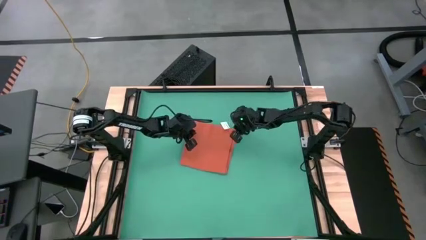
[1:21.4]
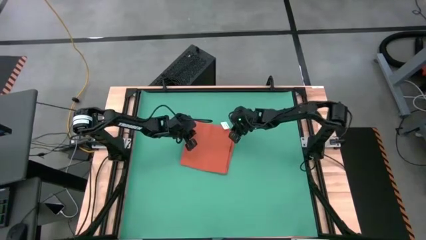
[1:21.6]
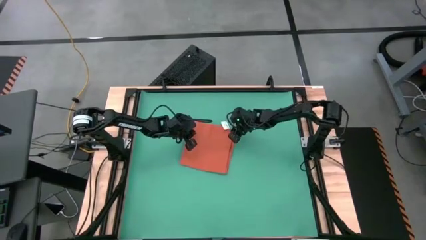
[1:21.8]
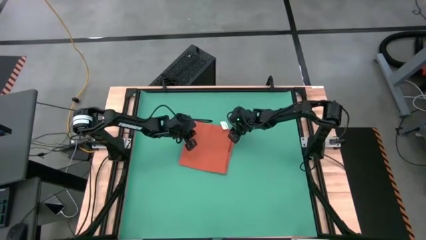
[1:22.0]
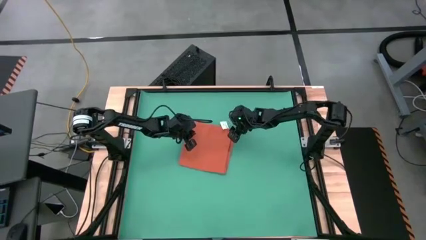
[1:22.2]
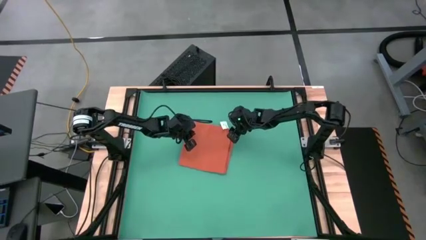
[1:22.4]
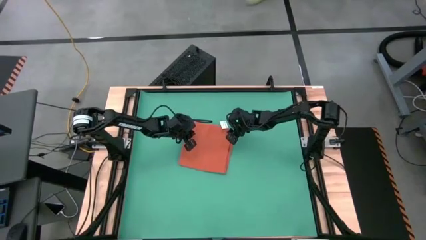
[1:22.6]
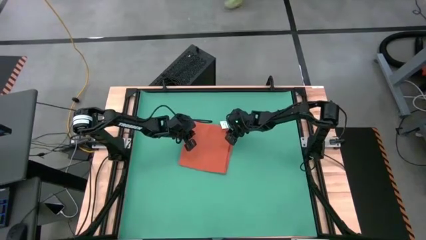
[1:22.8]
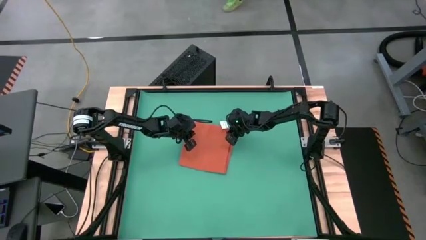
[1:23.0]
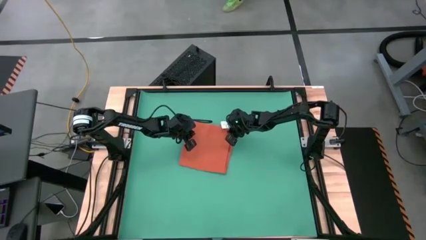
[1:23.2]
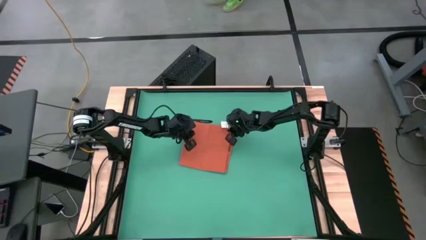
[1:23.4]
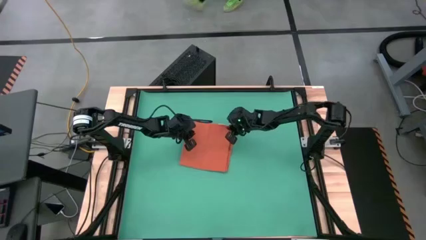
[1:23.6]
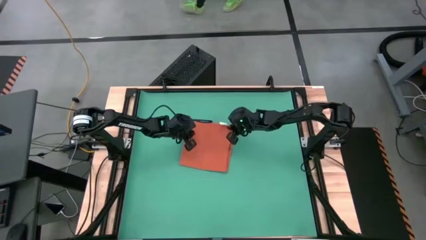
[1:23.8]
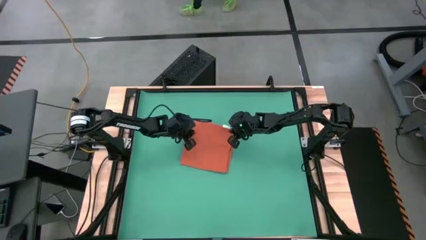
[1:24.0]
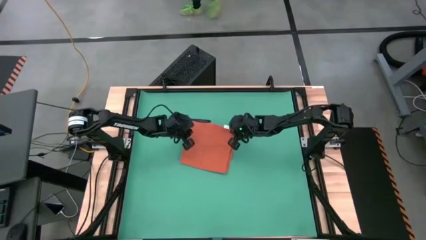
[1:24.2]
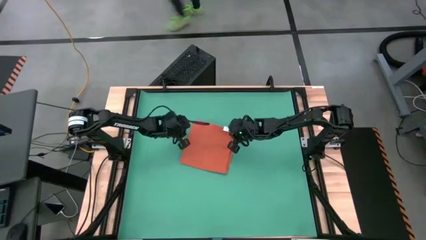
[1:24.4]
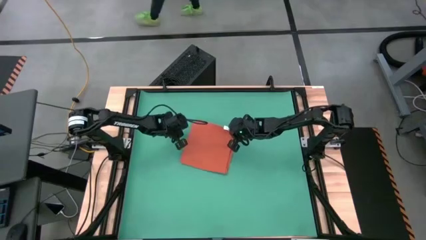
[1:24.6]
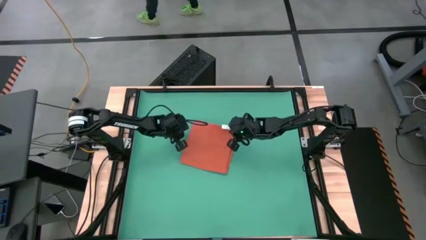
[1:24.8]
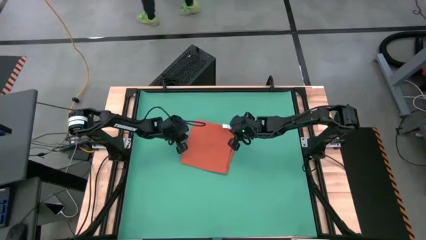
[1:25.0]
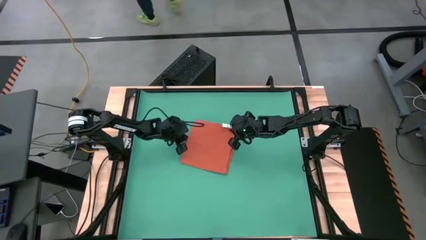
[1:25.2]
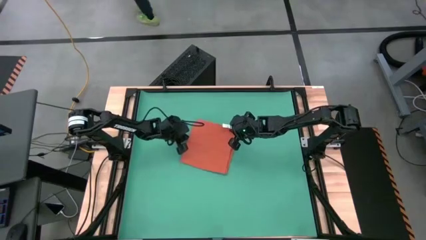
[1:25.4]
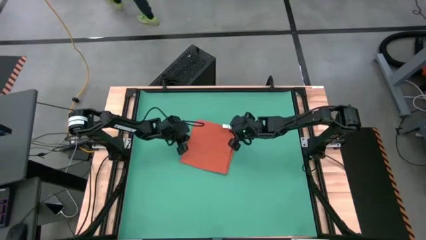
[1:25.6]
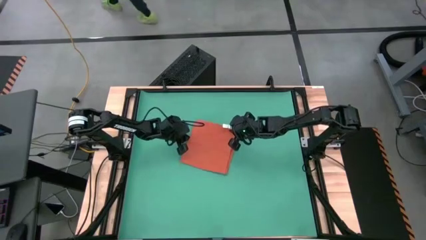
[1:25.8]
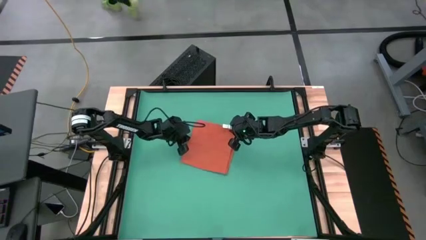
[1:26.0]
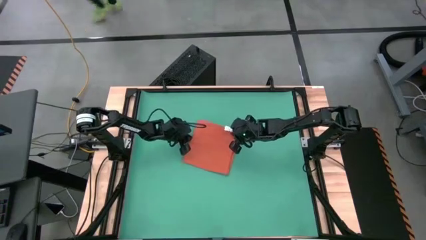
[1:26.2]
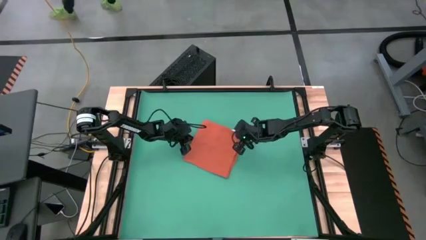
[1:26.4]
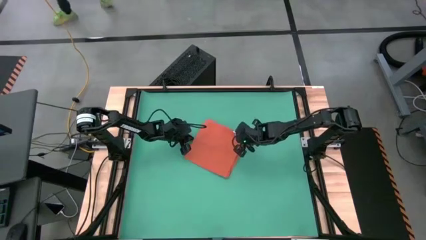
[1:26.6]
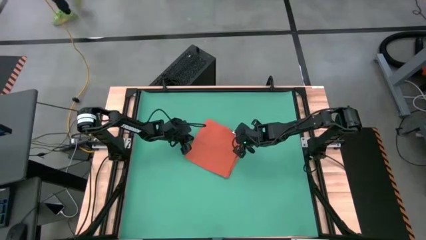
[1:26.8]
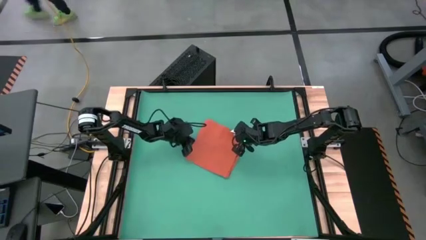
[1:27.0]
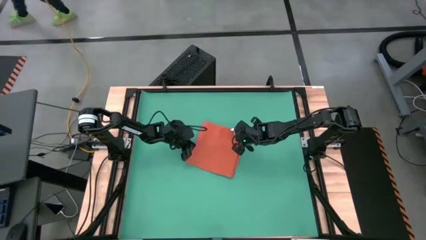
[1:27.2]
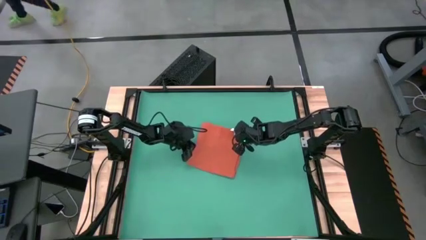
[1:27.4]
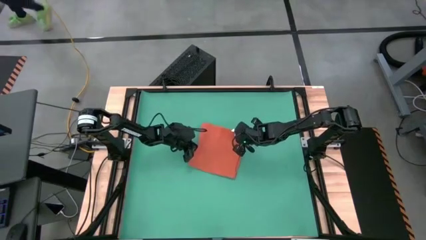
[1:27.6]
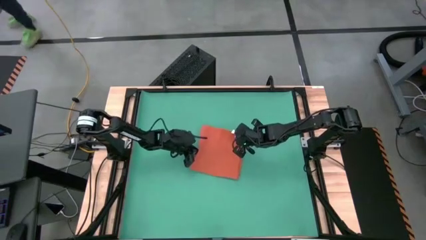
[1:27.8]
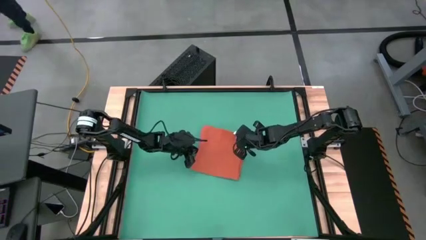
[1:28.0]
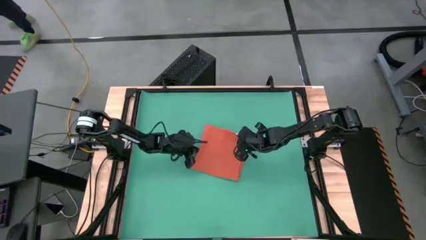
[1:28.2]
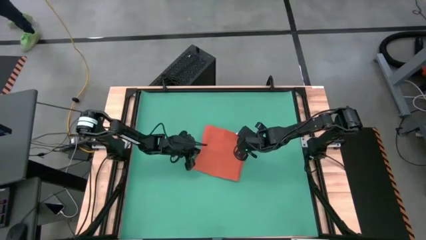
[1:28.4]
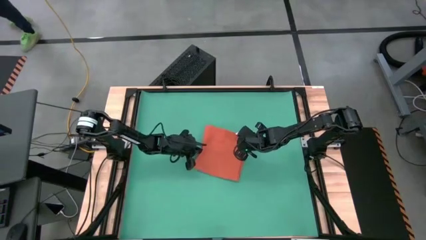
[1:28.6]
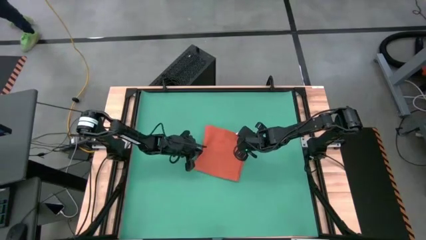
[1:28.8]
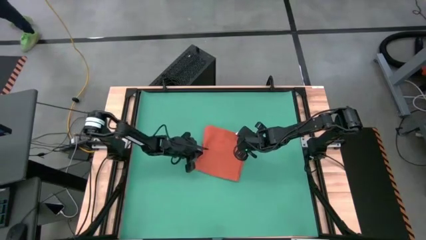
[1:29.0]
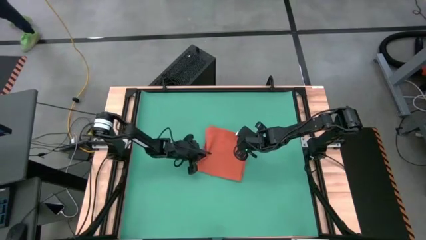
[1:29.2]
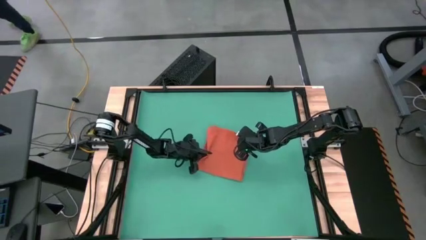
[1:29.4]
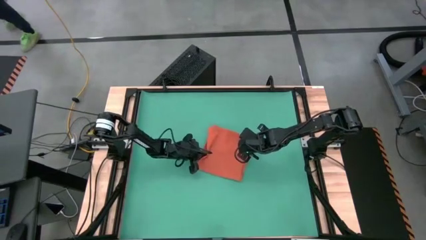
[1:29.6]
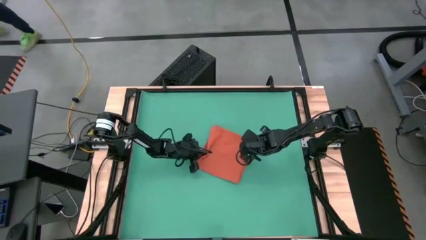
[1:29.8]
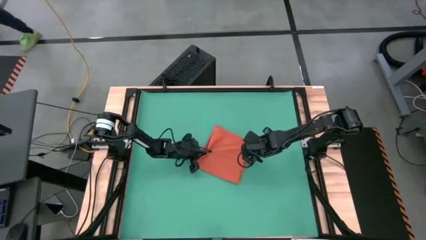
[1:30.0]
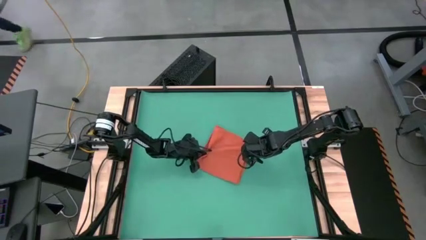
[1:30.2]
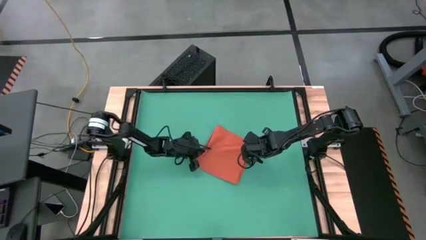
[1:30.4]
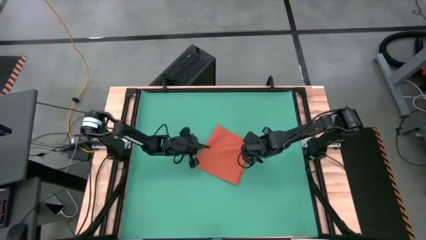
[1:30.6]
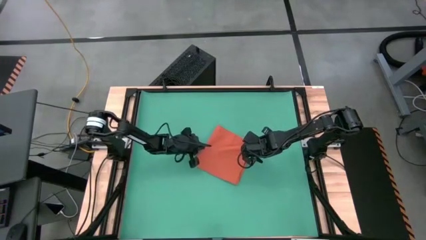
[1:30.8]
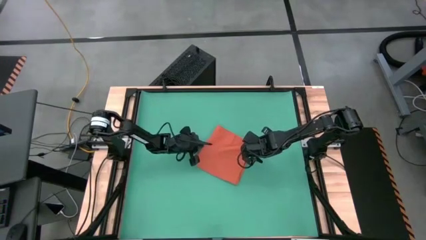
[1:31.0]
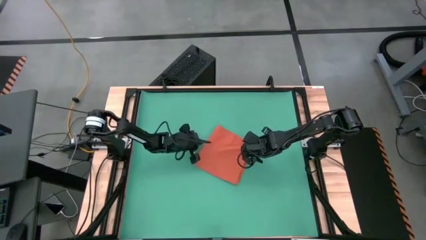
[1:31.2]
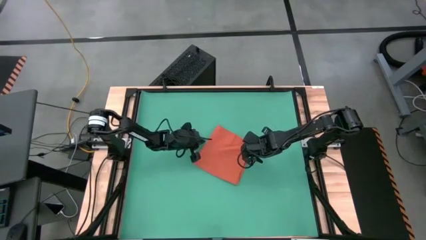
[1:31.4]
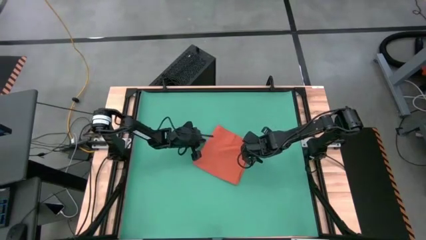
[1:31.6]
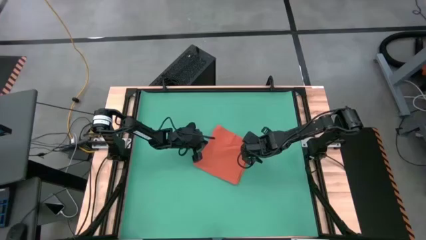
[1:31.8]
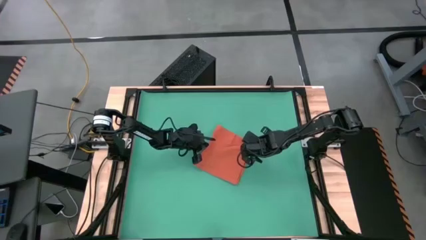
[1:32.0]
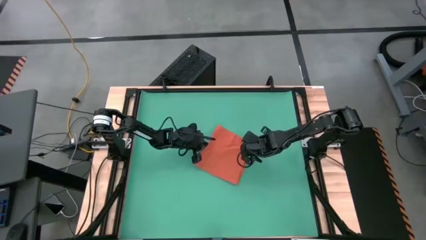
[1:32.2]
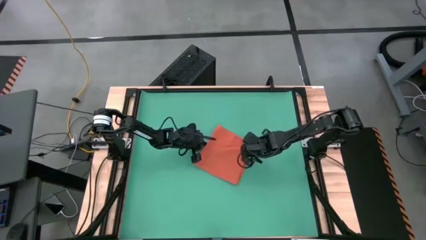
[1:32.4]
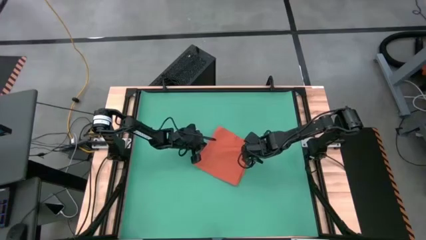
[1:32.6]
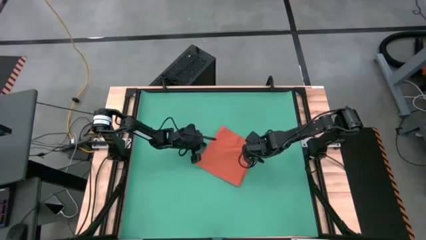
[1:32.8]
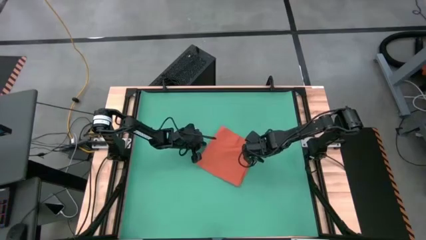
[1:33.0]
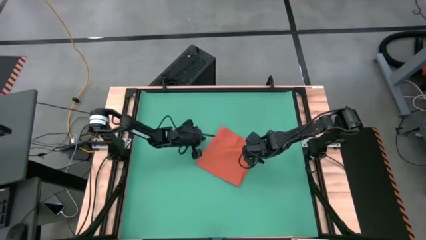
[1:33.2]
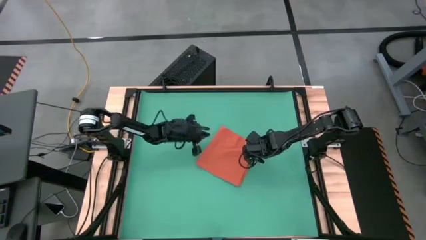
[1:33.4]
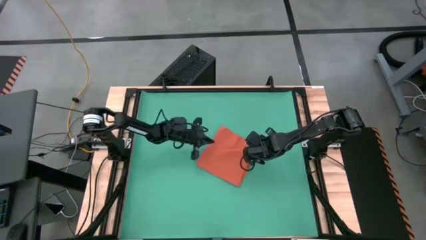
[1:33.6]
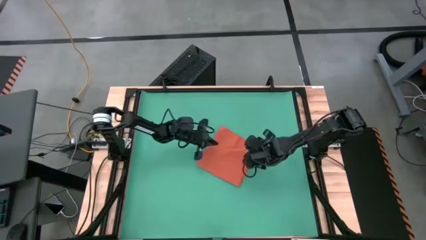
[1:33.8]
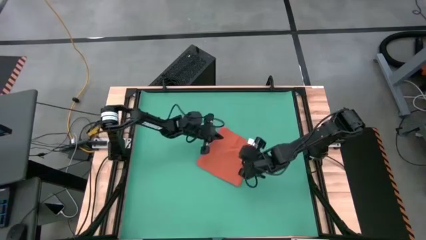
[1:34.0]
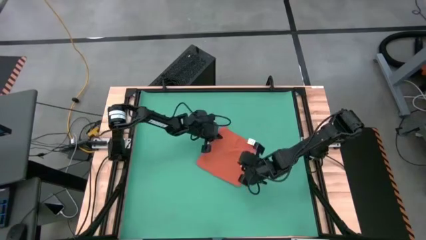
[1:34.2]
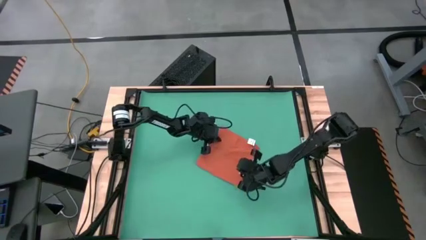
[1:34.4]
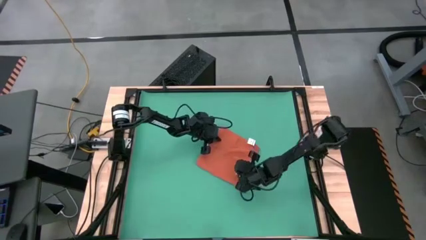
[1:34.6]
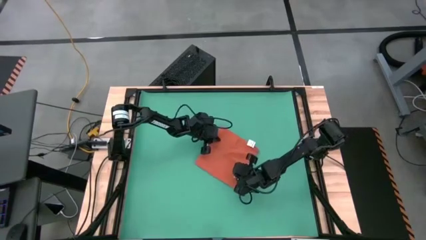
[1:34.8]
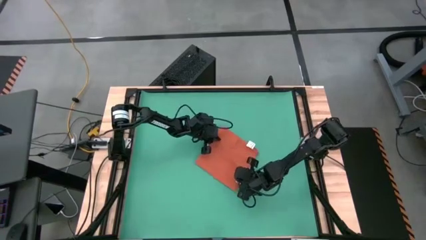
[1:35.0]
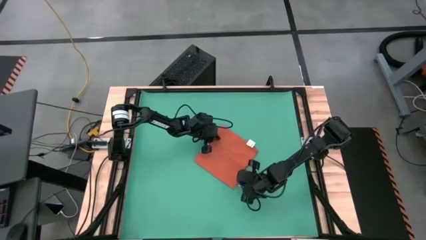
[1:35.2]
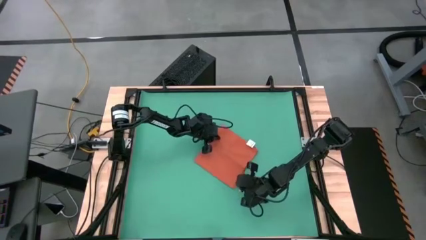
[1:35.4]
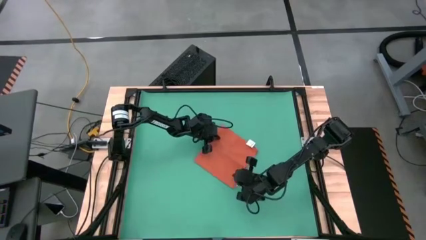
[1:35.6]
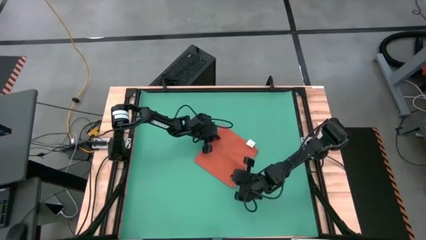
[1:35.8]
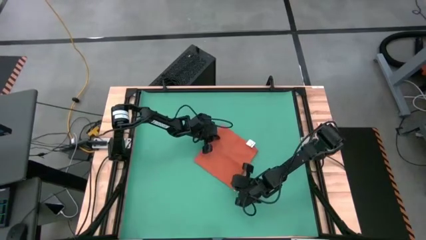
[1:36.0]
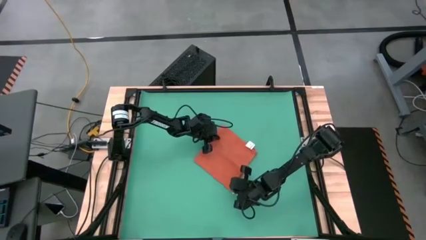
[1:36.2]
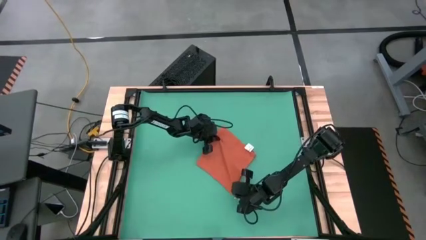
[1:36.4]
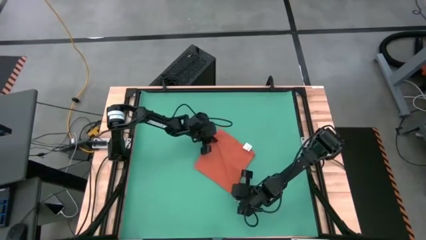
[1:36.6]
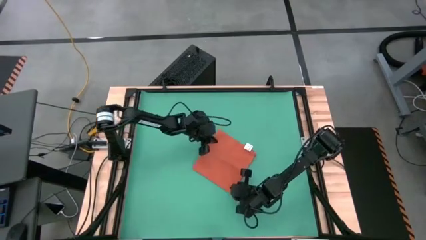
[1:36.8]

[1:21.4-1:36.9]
Task: Roll towel
Fold the orange towel
